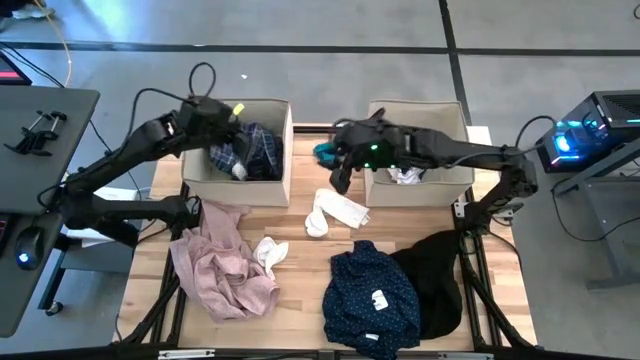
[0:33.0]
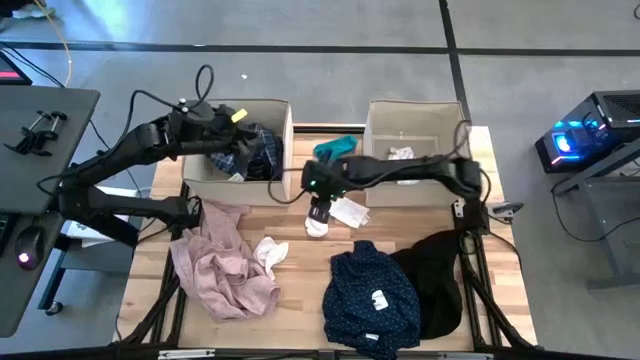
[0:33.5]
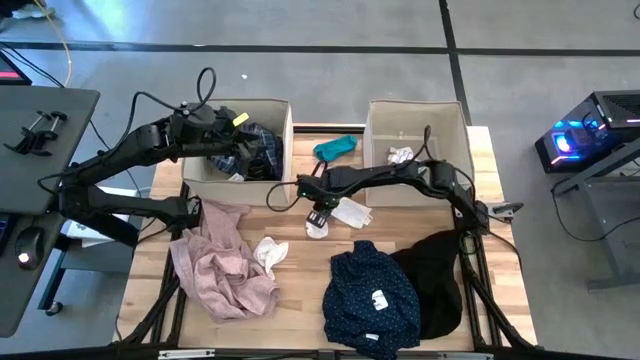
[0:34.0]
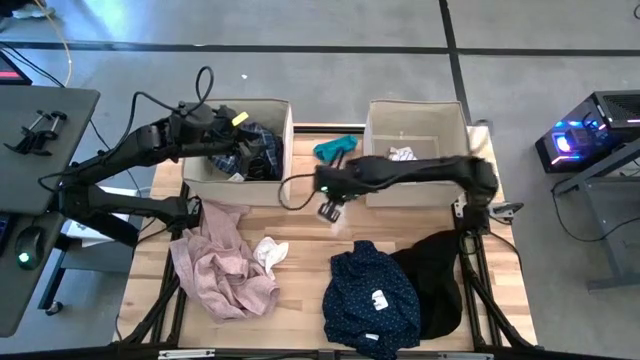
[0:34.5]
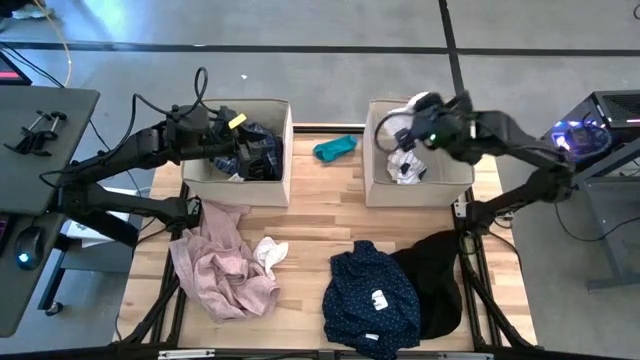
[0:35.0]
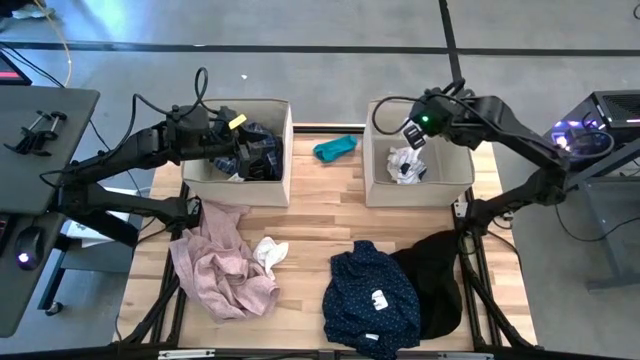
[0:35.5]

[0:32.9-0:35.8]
Task: Sort clothes
Put the white cloth into the right laundry organizer

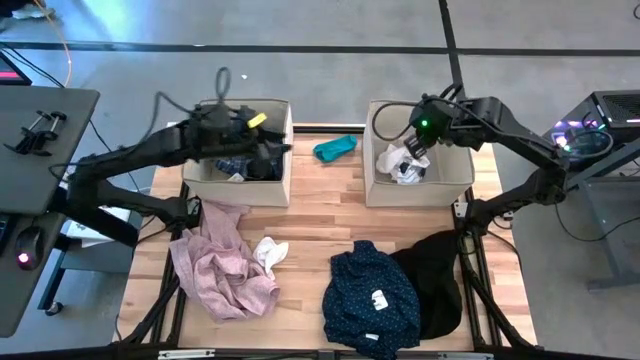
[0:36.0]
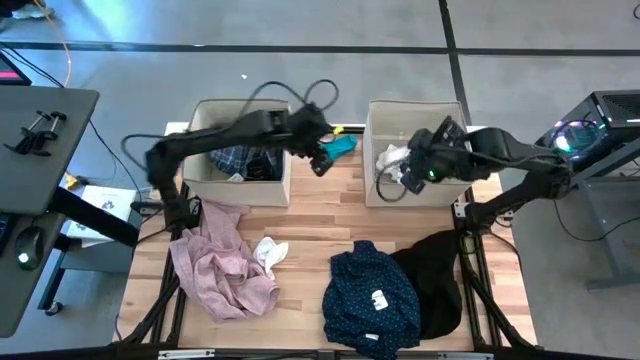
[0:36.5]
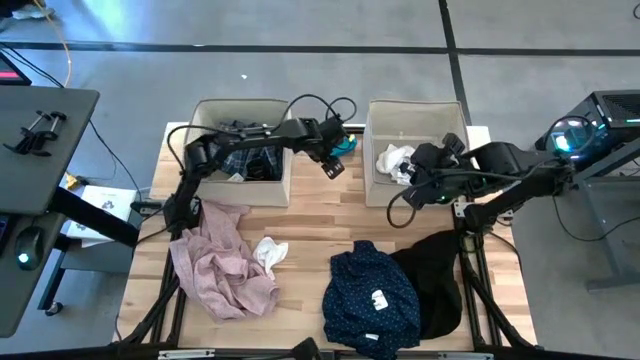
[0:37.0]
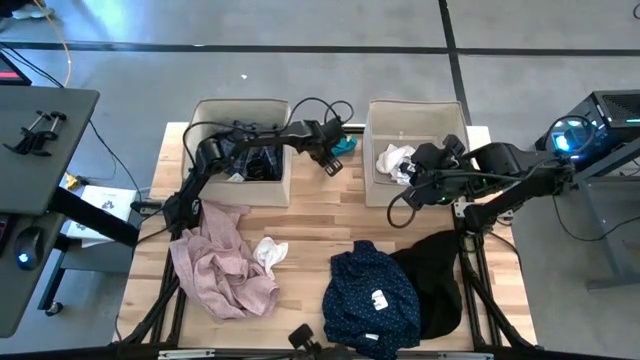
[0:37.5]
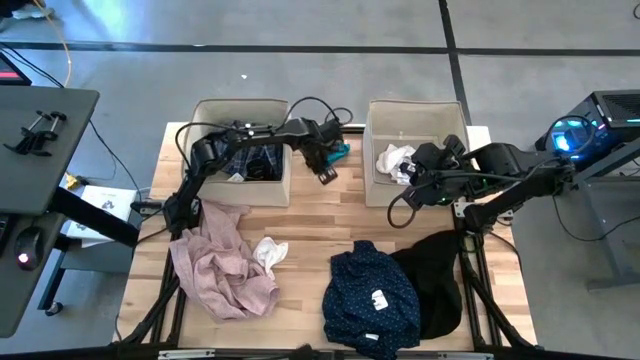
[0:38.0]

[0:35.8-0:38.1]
Put the blue sock into the right laundry organizer

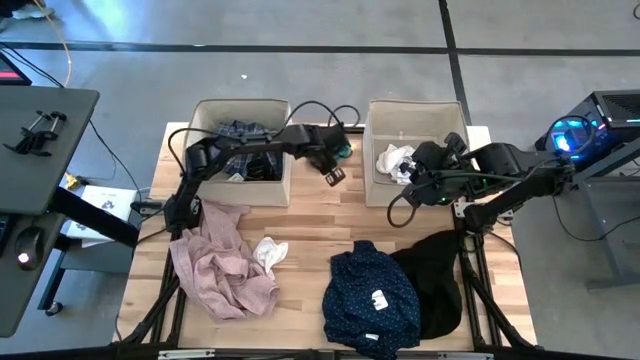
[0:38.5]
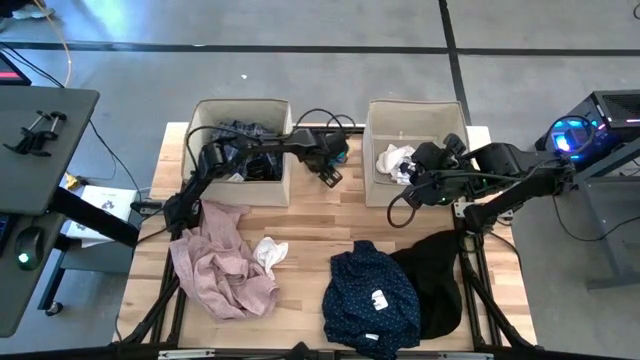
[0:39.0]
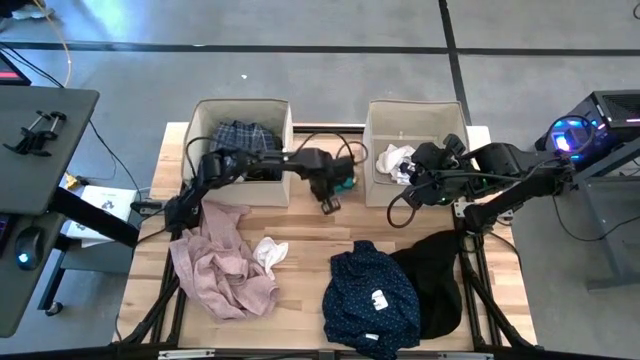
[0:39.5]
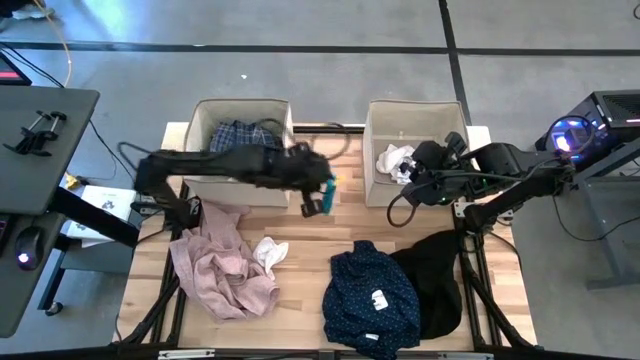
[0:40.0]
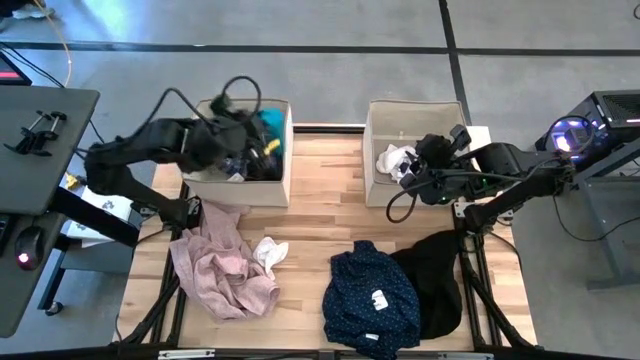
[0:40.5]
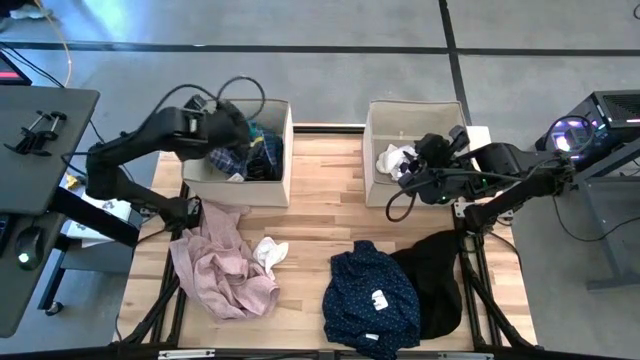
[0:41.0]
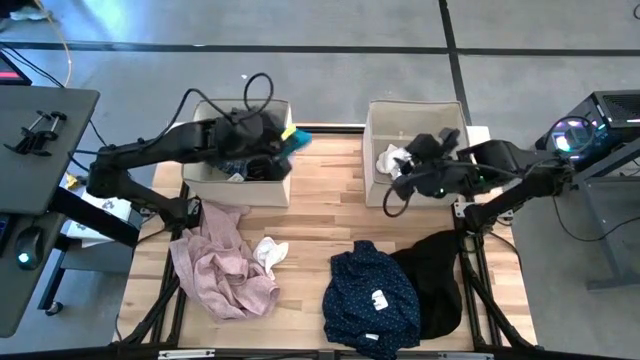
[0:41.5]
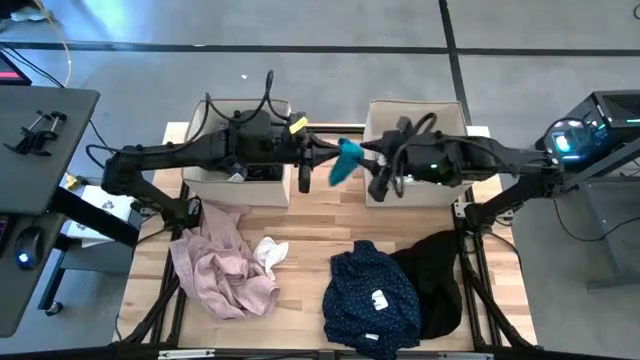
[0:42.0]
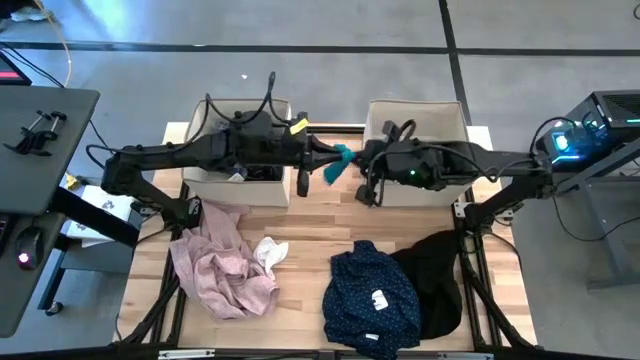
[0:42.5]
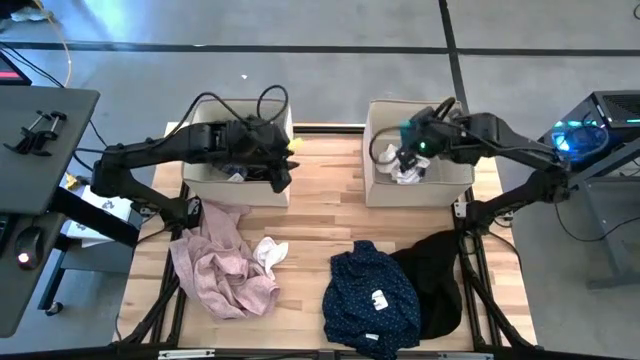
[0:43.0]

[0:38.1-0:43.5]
Put the blue sock into the right laundry organizer

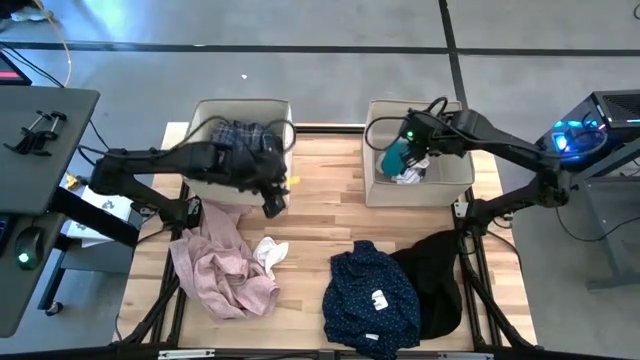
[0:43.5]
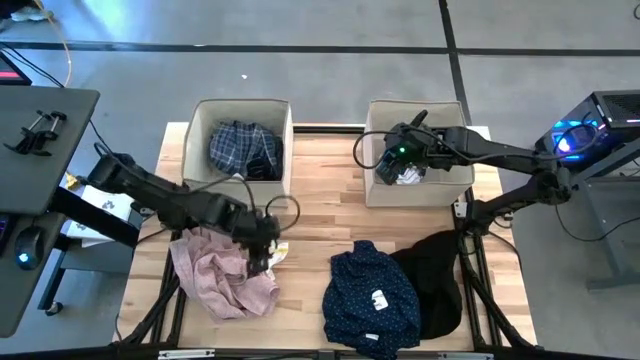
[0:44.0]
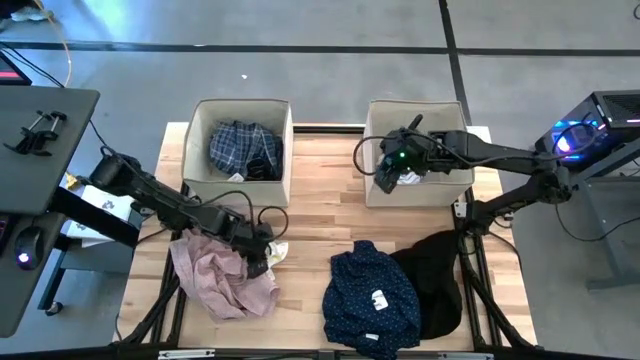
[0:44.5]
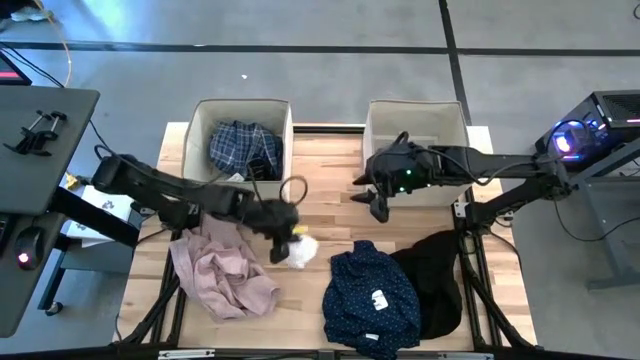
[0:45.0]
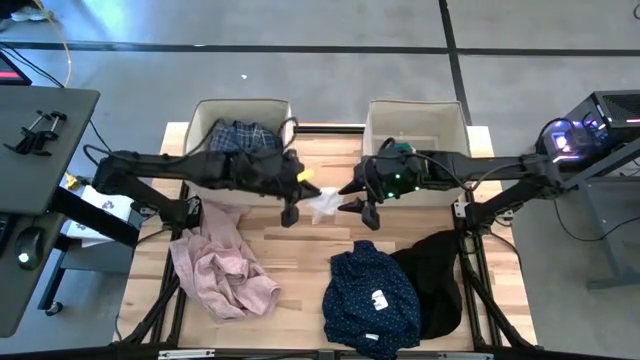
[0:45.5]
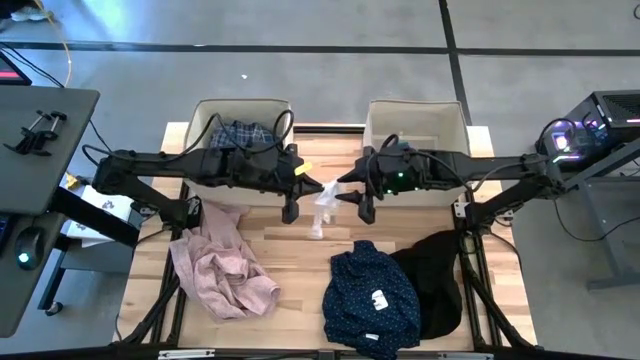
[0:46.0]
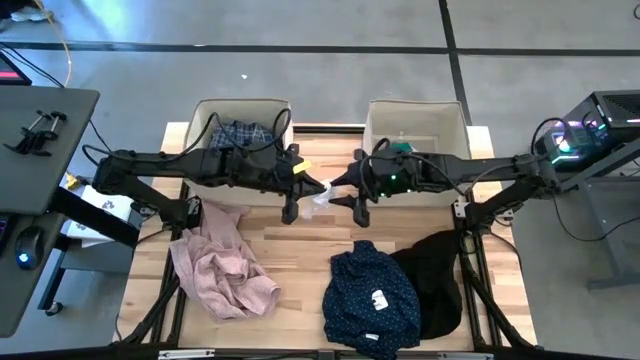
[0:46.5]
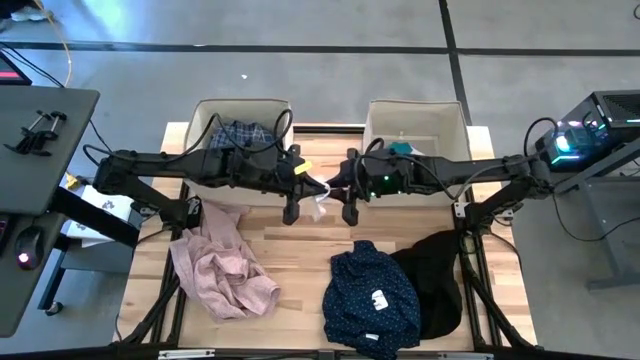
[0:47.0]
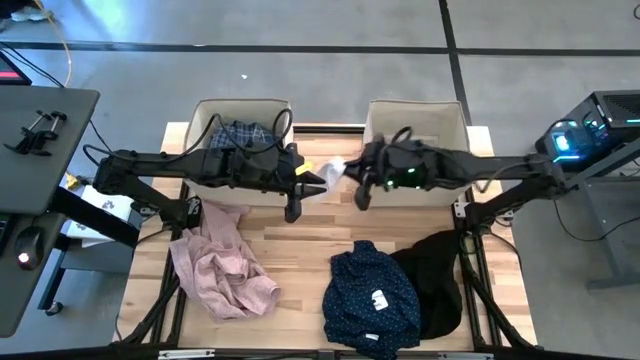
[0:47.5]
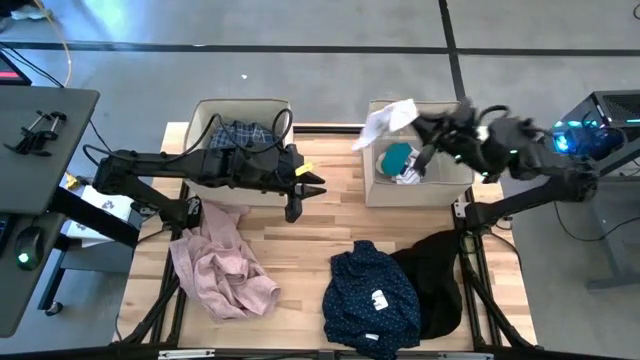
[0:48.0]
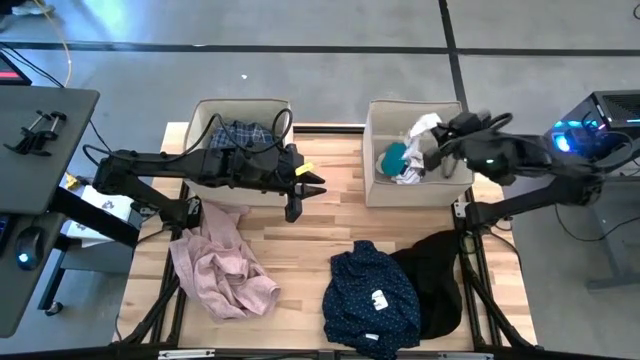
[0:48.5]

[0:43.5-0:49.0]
Put the white cloth into the right laundry organizer

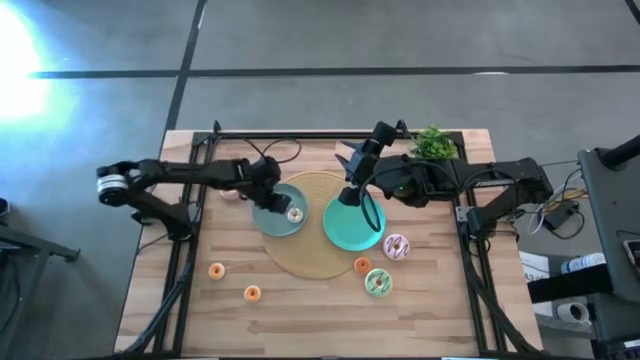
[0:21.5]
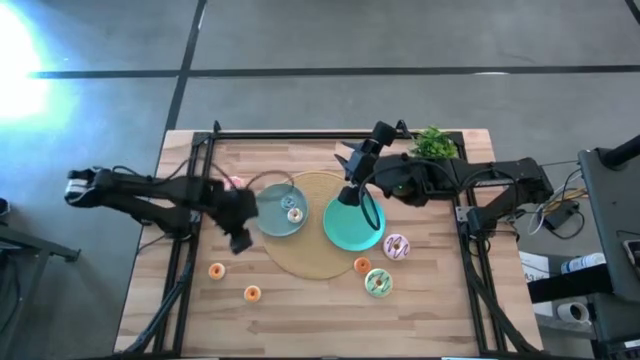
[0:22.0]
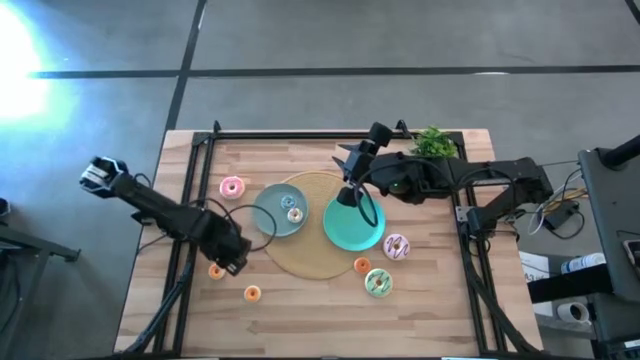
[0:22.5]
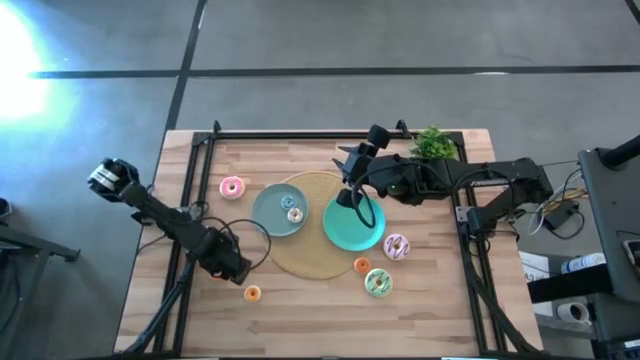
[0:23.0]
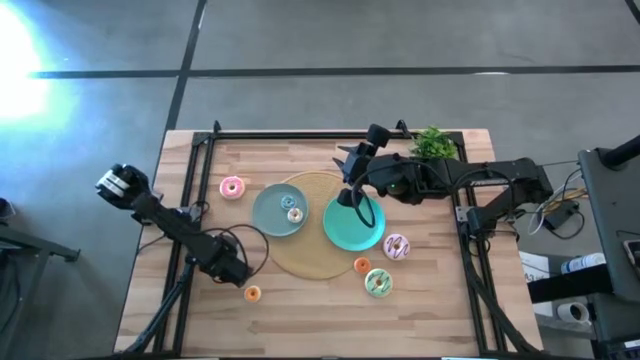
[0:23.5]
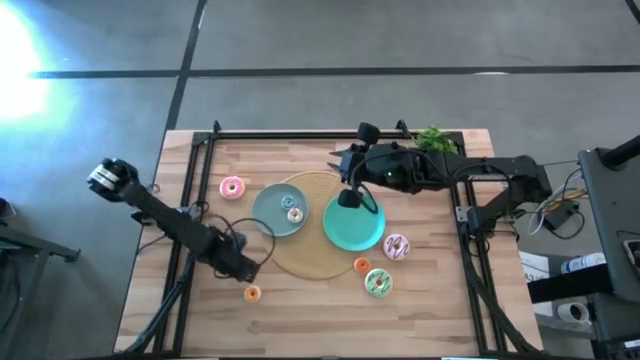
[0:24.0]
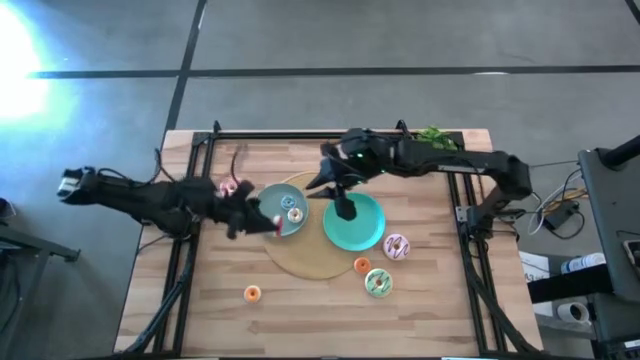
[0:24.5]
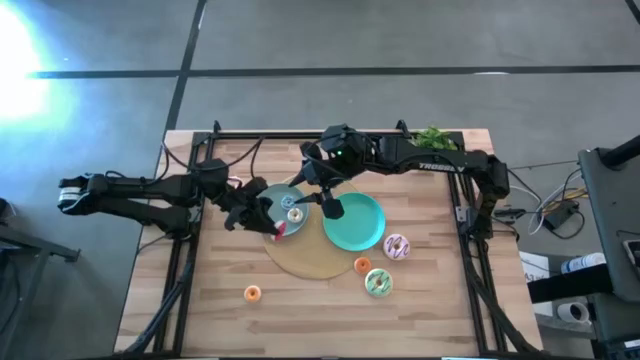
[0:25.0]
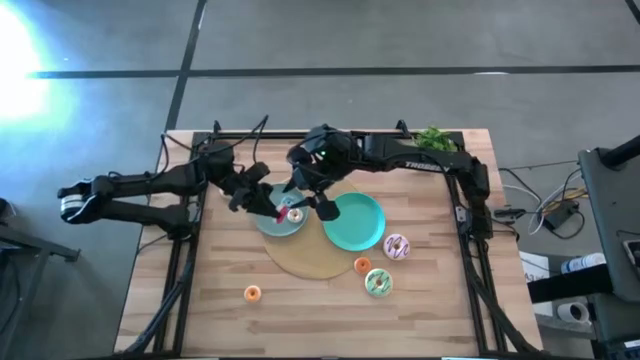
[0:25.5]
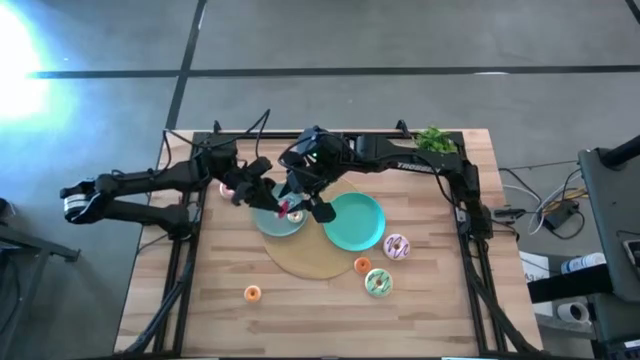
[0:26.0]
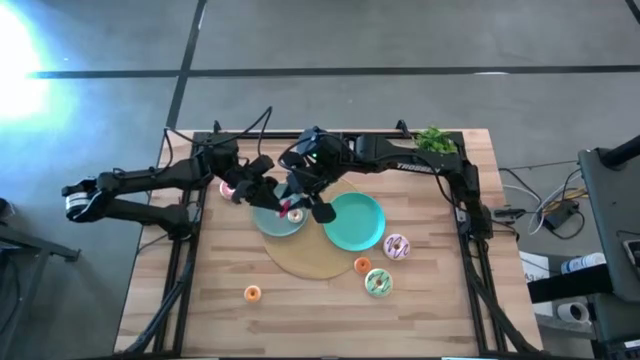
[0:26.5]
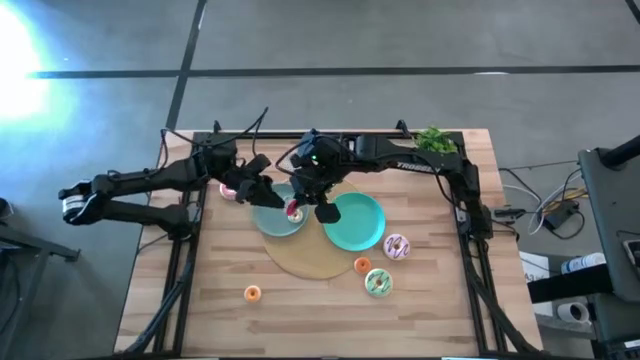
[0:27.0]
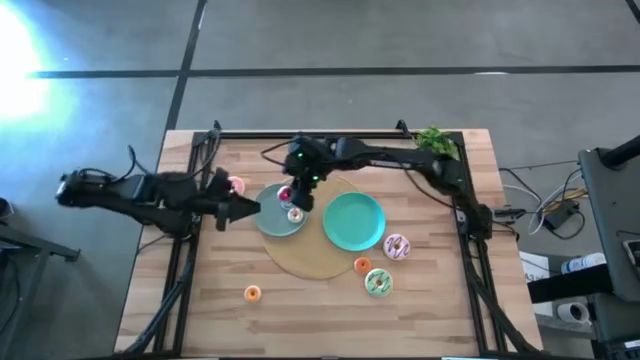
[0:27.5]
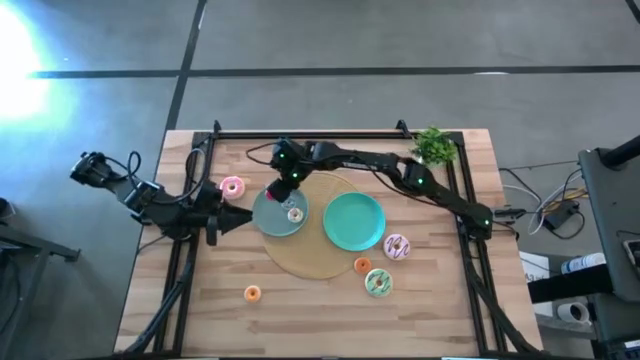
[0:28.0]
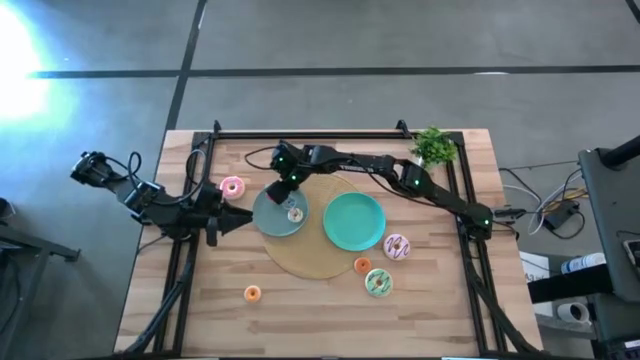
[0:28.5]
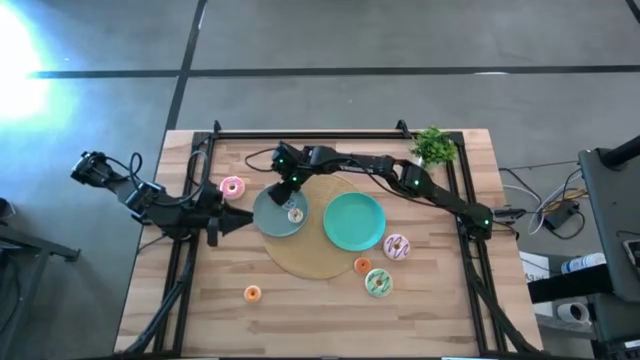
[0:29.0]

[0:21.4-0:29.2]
Task: Pick & Place donuts
Put the small red donut on the light blue plate
